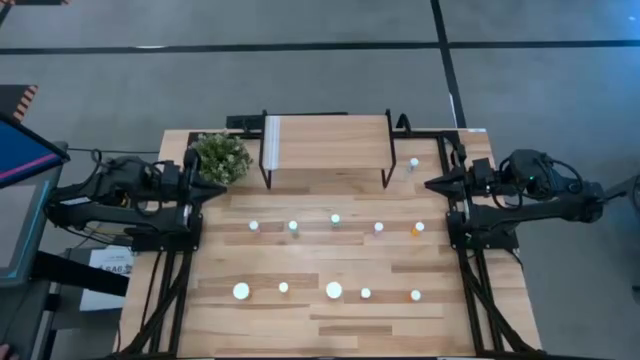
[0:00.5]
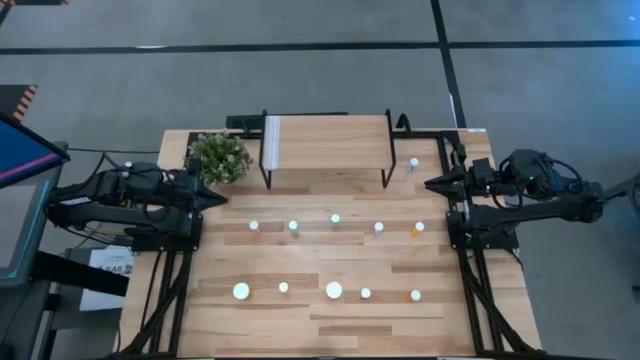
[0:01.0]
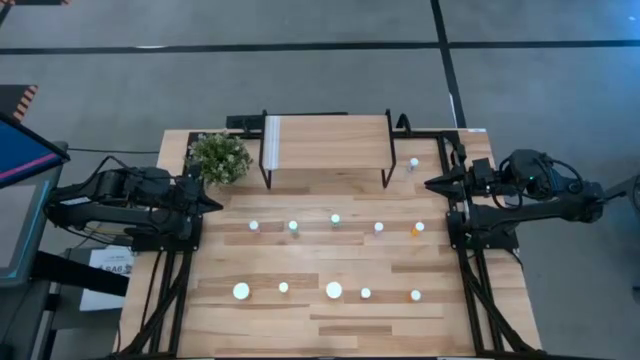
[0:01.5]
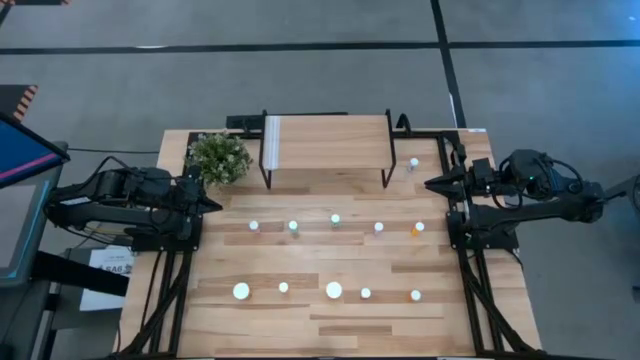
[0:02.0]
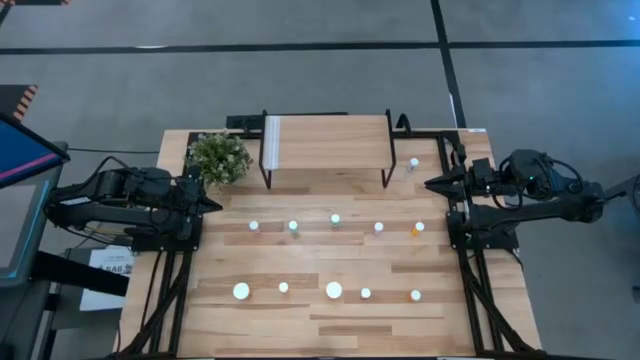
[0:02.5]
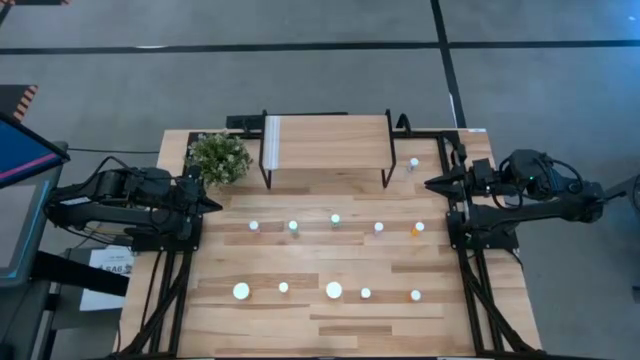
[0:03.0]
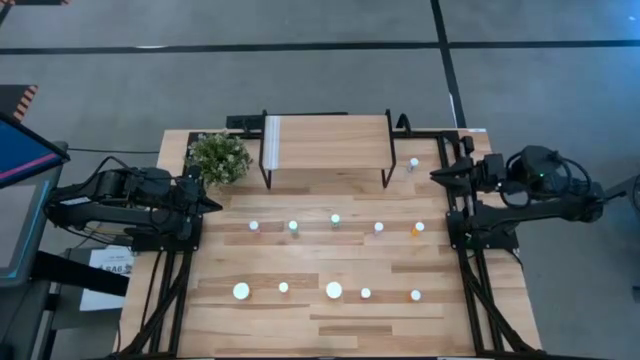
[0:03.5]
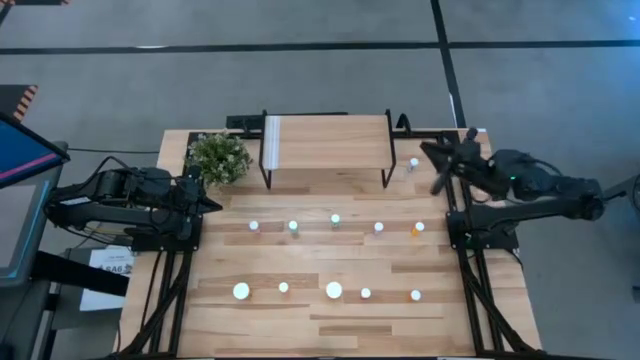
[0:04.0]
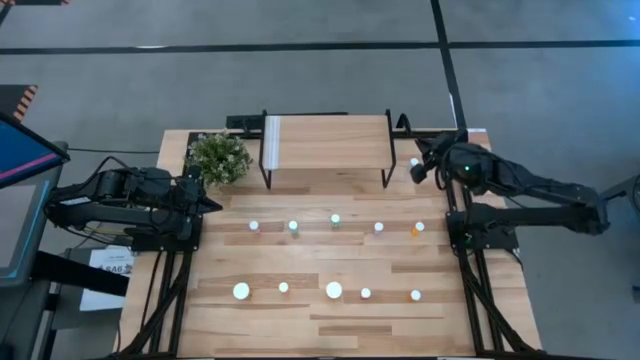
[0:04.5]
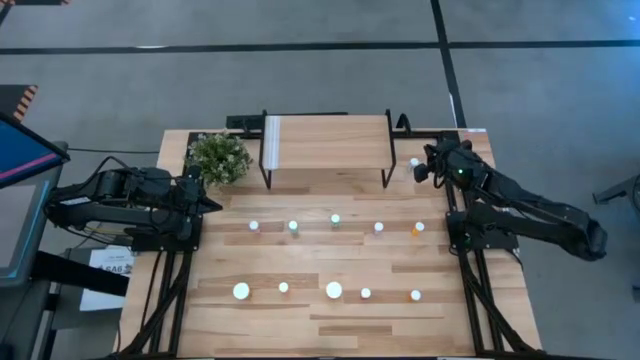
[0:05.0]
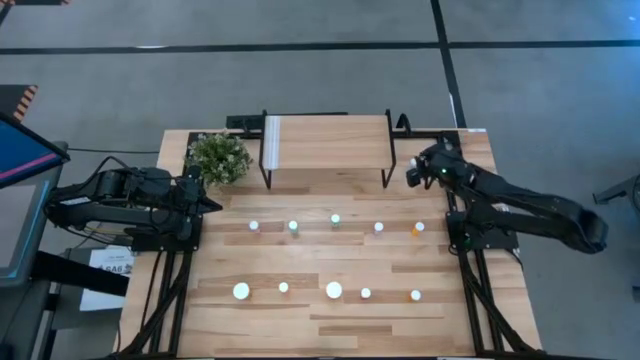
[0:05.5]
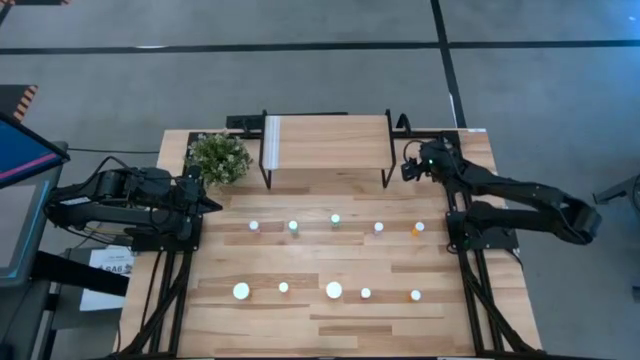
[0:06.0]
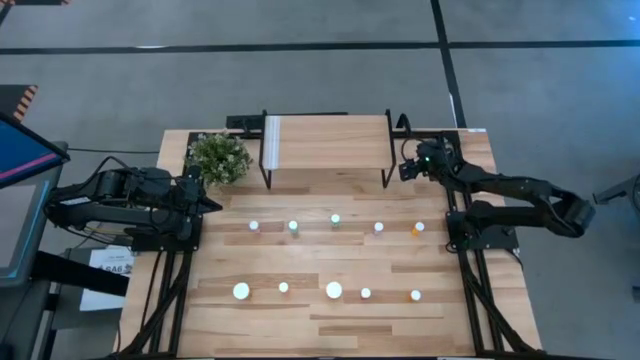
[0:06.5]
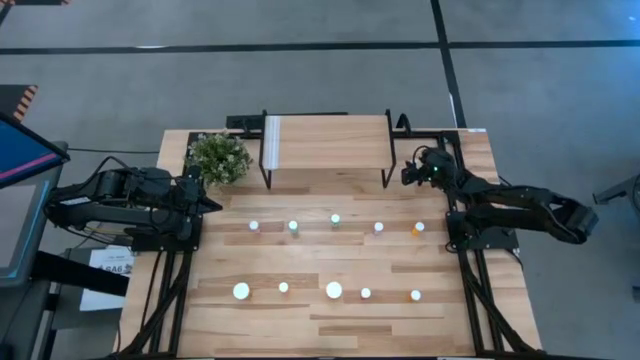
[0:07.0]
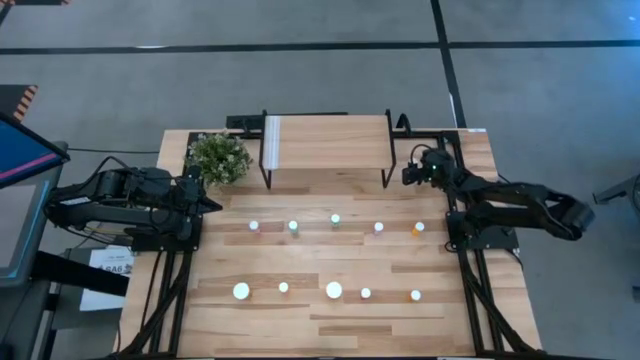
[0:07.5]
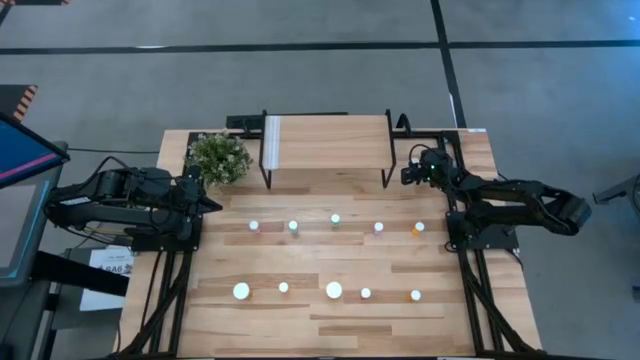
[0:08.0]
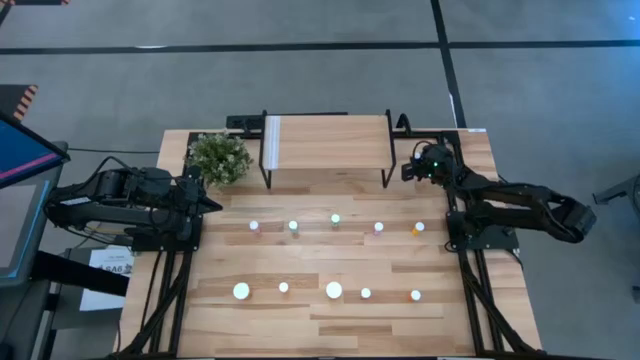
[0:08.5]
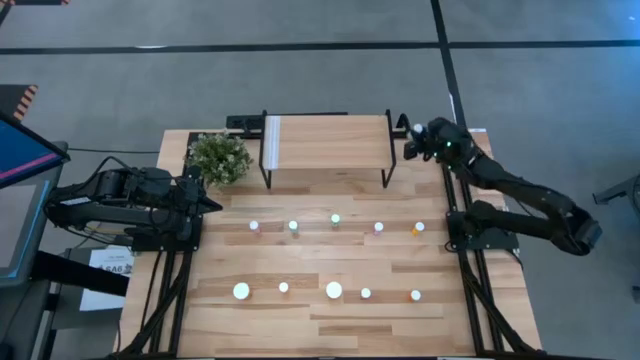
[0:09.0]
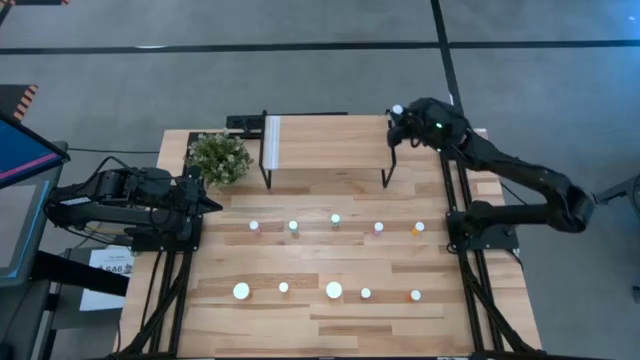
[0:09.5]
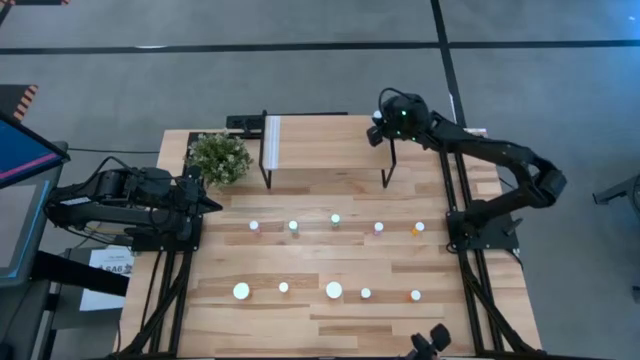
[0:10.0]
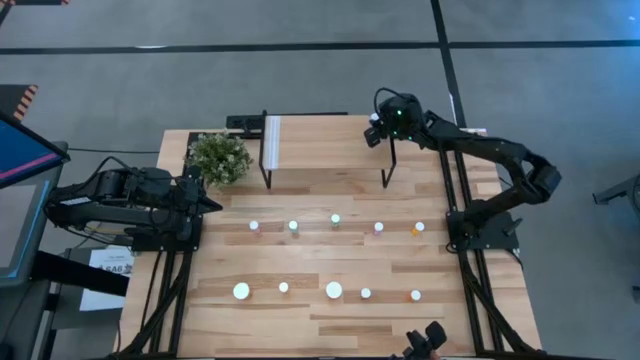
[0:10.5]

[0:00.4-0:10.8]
Task: Pick and place medicine bottles onto shelf by color
Put the top blue pill bottle onto the shelf

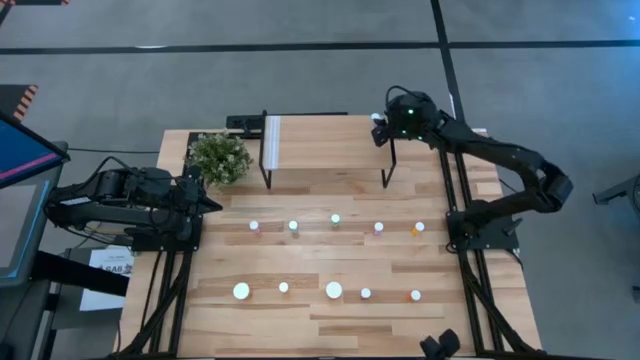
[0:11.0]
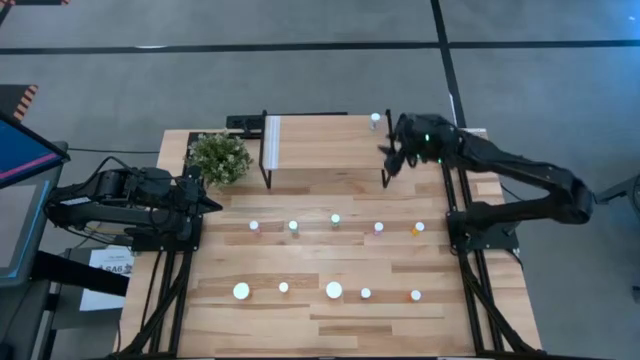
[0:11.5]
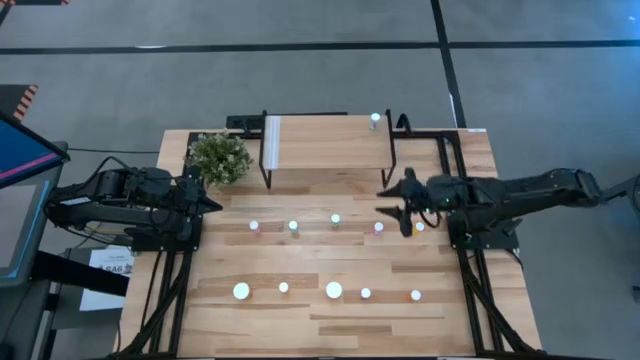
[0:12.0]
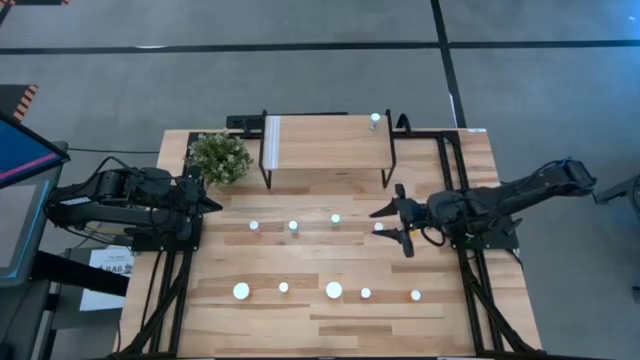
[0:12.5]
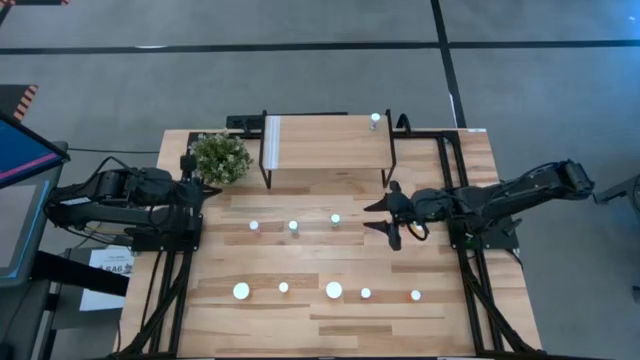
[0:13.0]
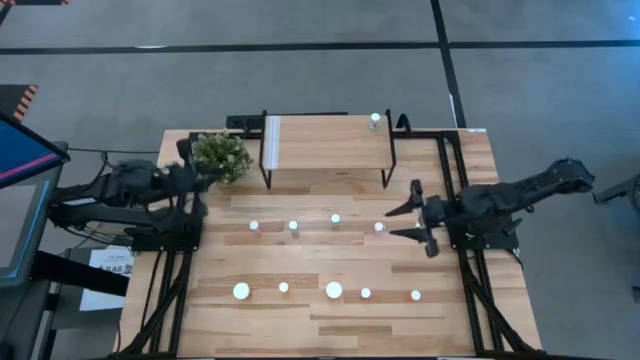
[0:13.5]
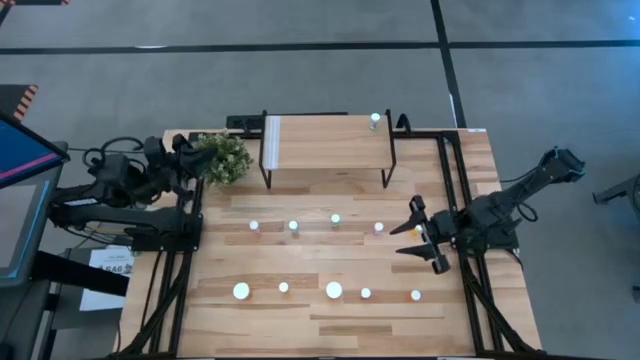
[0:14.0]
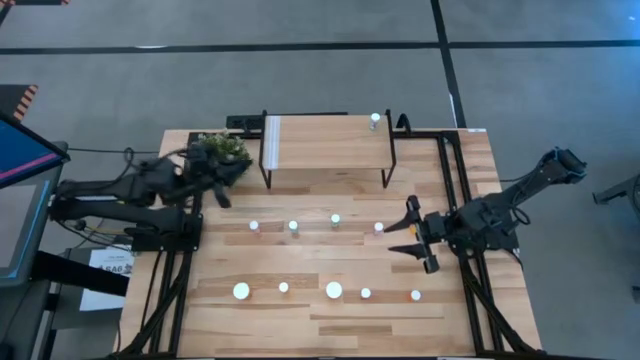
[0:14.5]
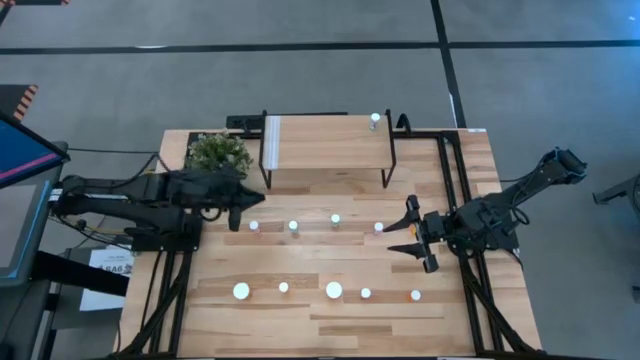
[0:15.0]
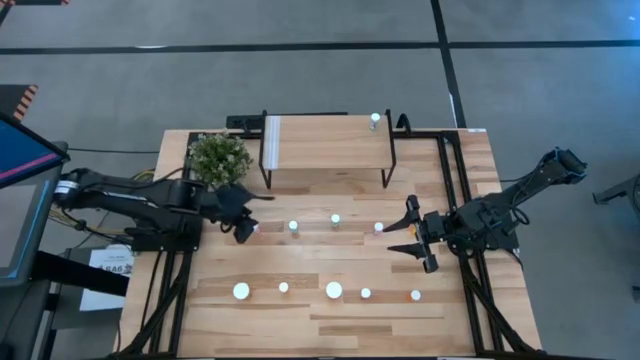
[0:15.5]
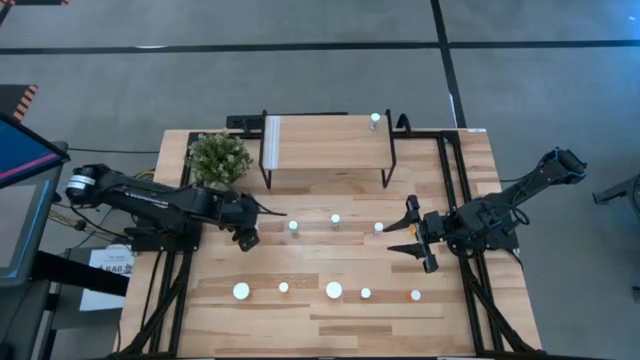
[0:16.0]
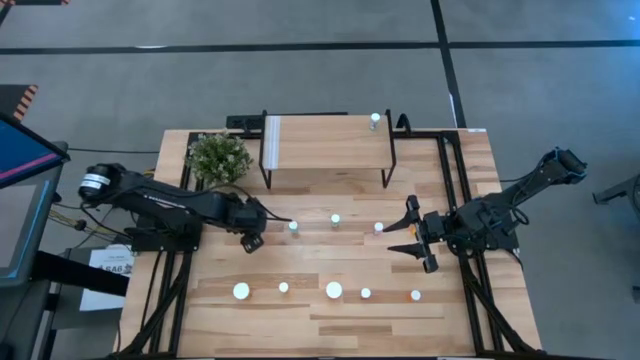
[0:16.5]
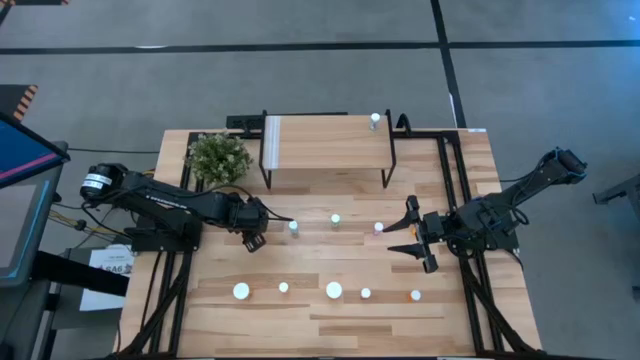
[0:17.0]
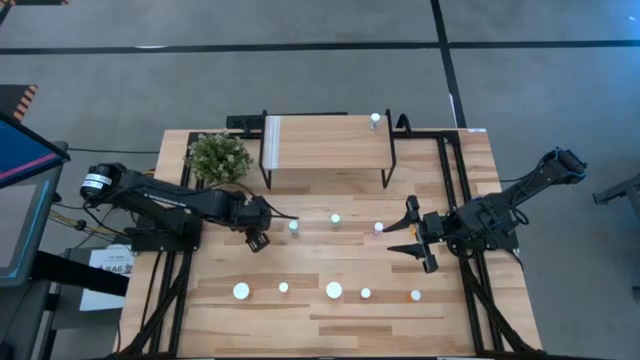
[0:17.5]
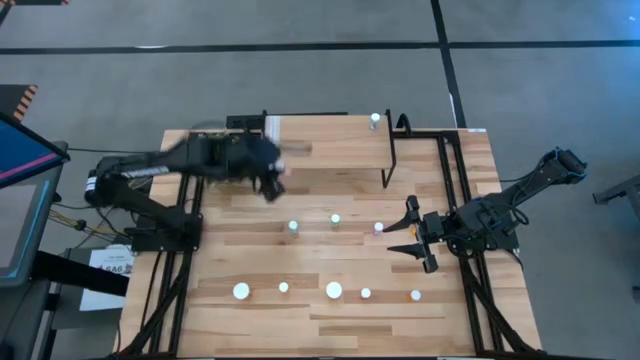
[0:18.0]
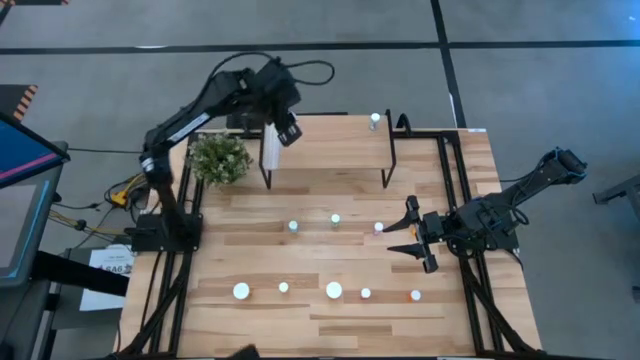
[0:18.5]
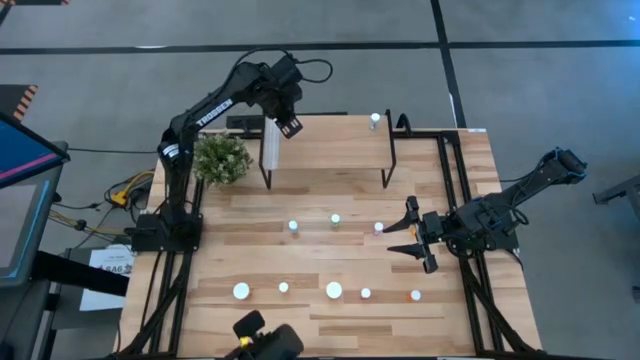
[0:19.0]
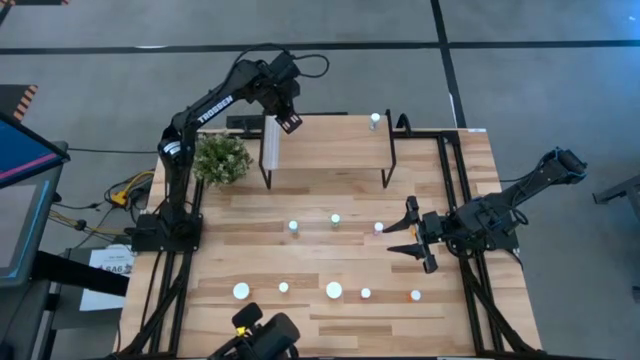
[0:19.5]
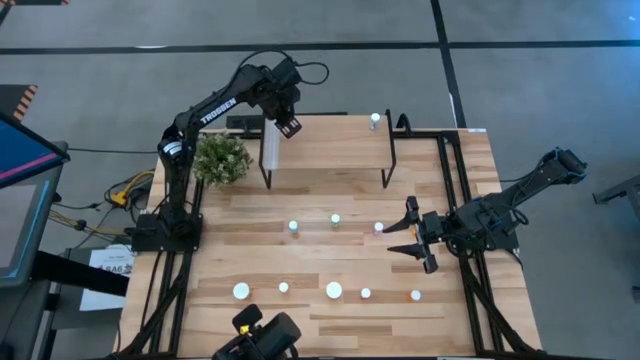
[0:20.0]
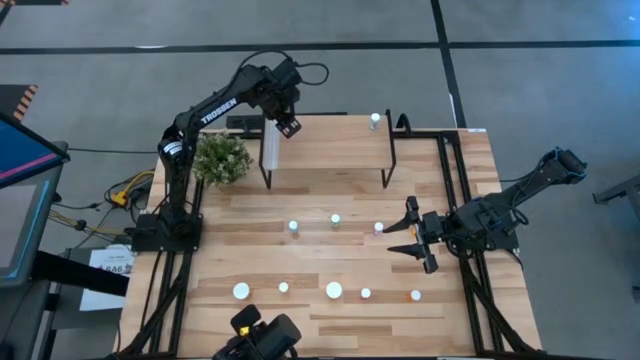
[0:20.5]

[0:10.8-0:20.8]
Put the top left pink pill bottle on the shelf

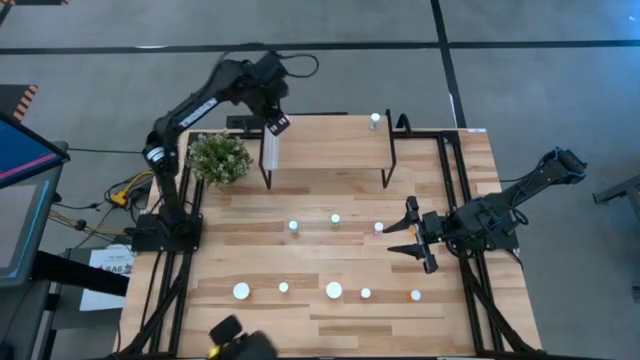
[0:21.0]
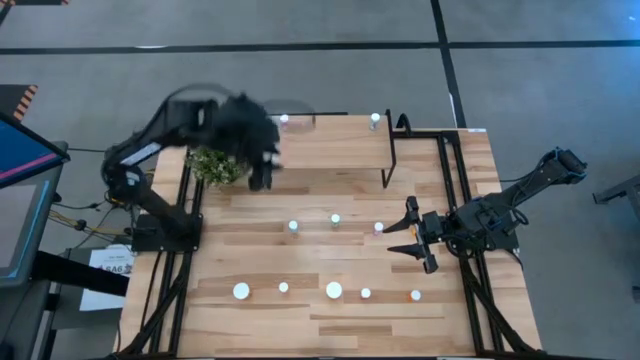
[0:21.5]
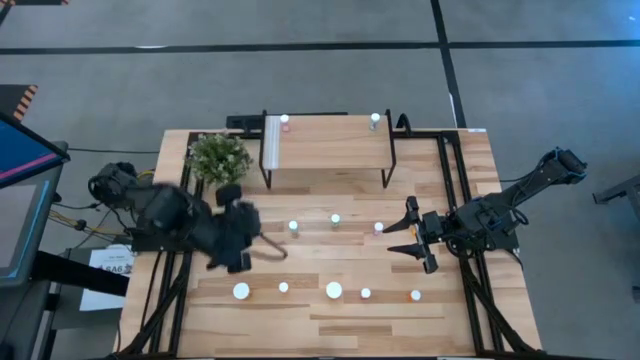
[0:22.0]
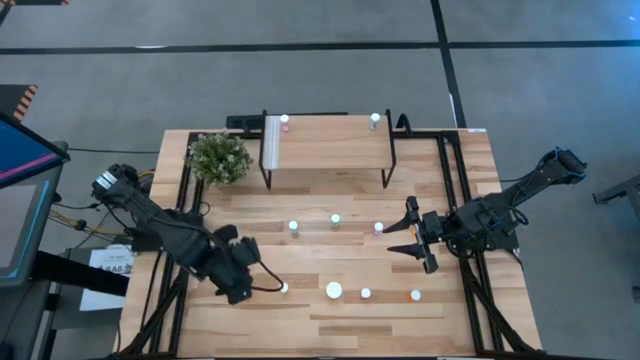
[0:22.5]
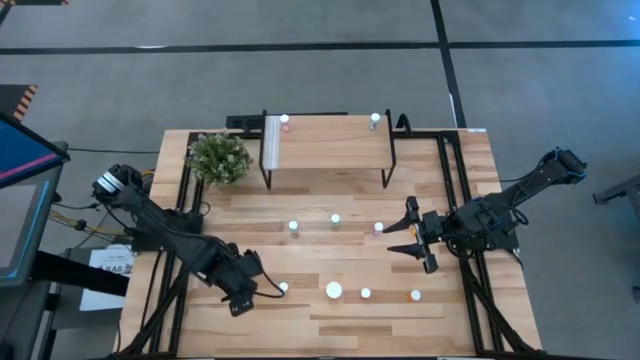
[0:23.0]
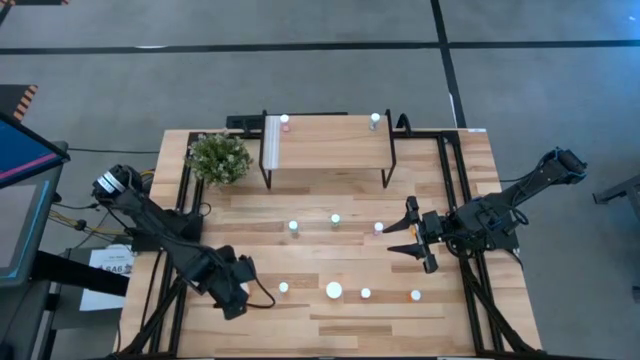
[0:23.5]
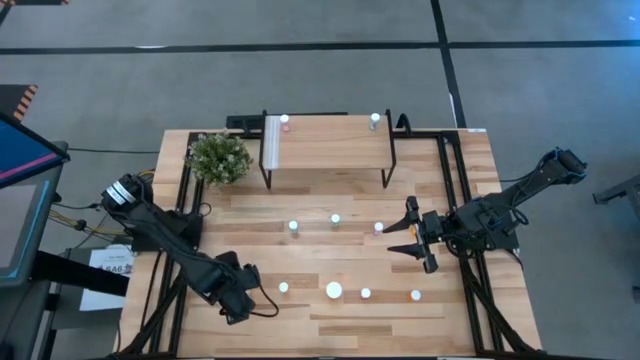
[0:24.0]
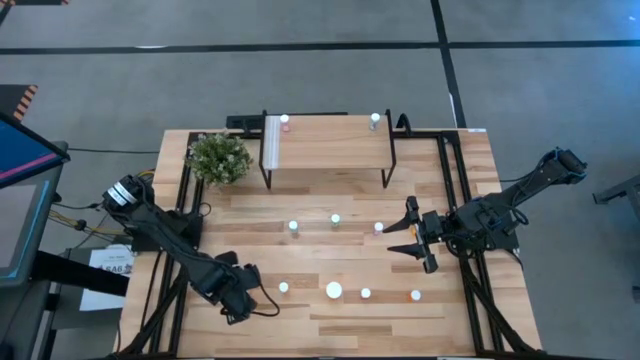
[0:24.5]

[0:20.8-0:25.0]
Put the bottom left big orange pill bottle on the shelf
